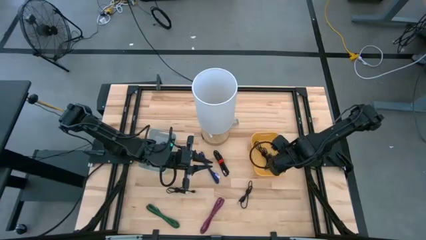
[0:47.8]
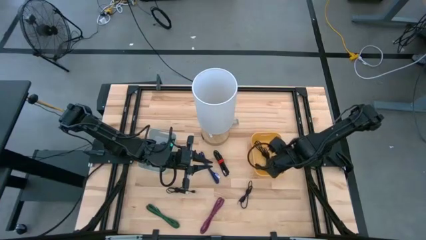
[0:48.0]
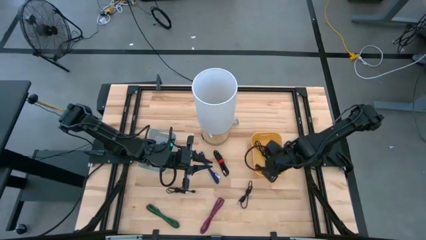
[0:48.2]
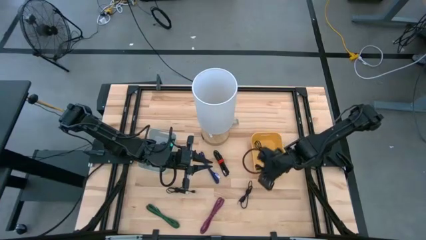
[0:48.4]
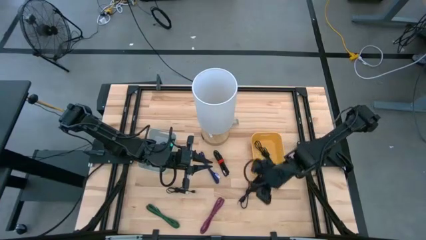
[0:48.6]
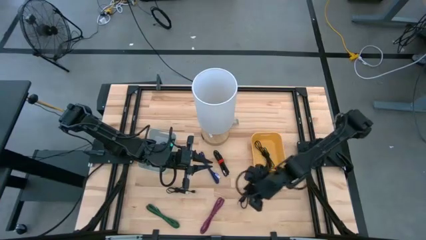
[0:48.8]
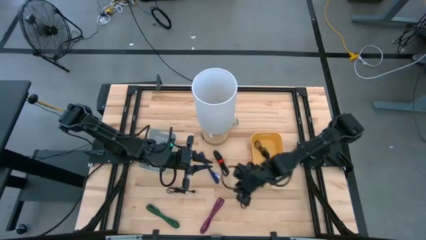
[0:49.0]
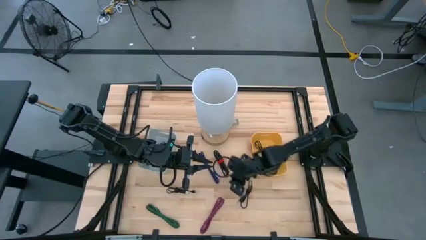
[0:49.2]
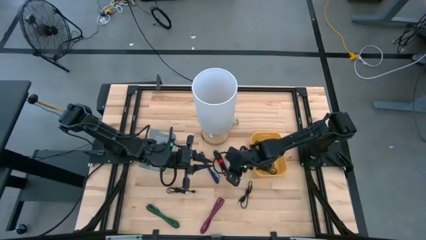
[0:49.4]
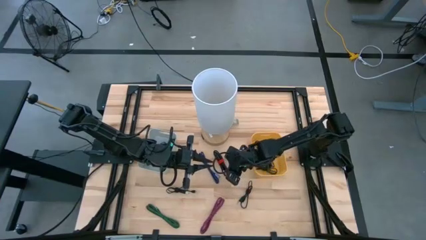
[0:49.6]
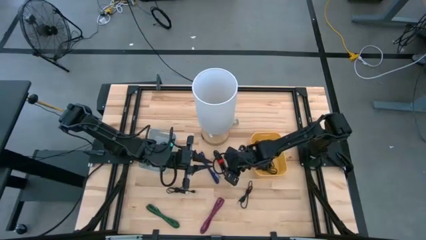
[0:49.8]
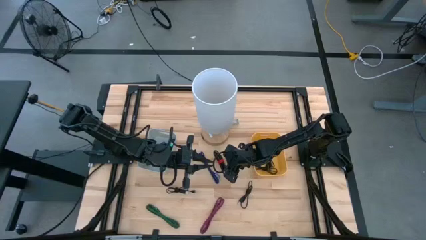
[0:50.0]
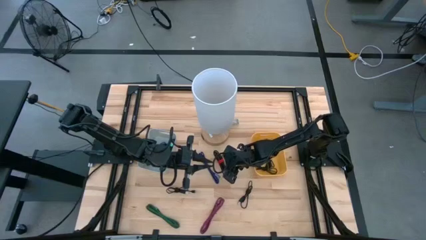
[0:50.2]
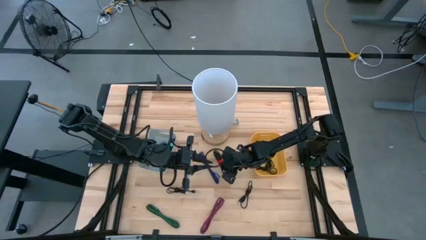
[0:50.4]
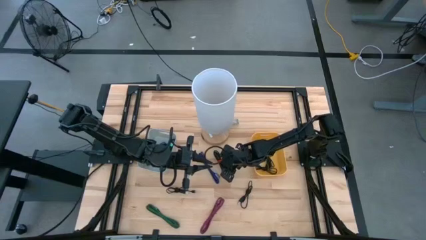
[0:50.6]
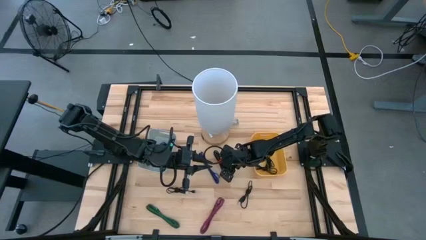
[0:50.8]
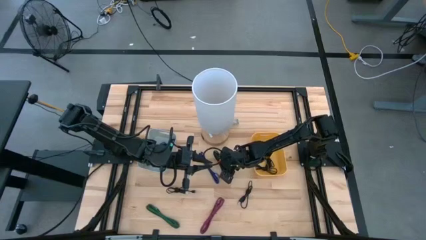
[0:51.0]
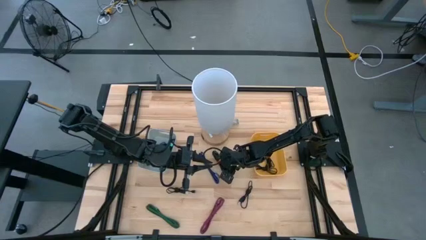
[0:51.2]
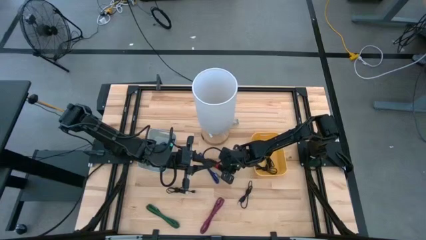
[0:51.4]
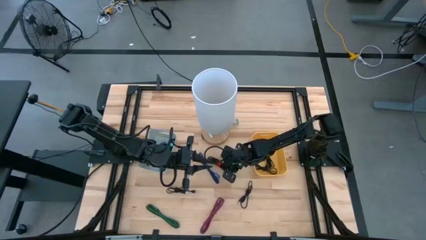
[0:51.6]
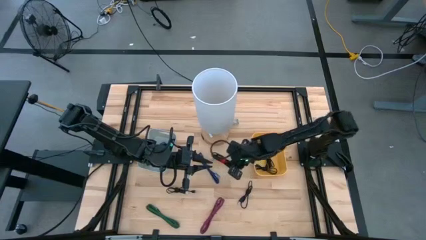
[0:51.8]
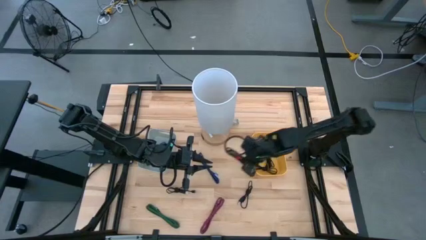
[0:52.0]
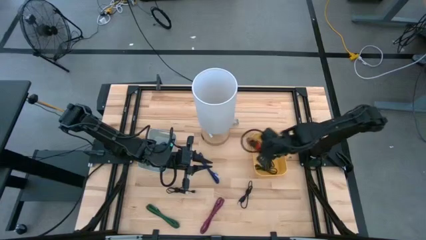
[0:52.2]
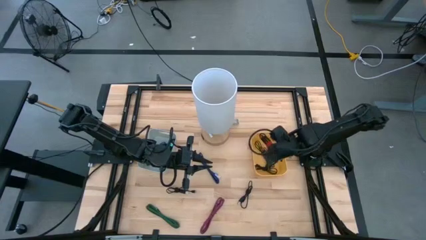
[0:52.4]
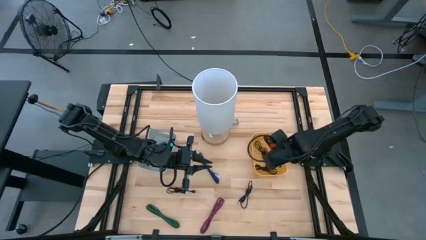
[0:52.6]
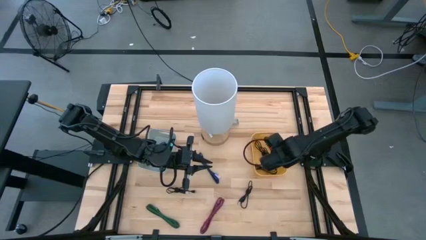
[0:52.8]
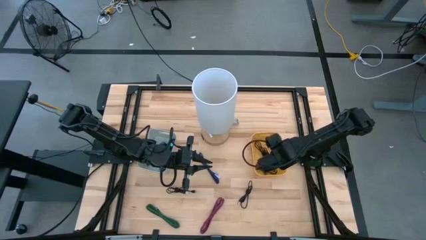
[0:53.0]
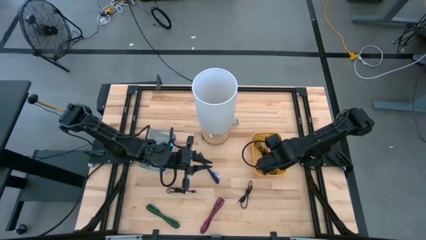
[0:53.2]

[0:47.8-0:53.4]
Task: Pick & Place USB Port
Put the black USB charger into the yellow bin

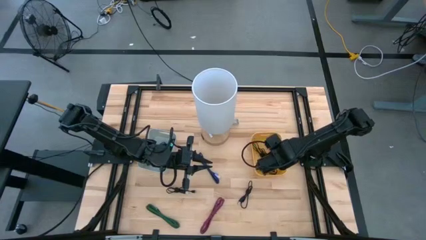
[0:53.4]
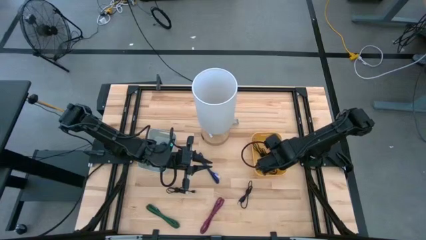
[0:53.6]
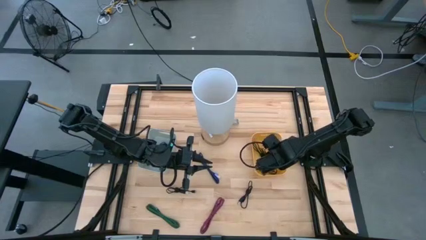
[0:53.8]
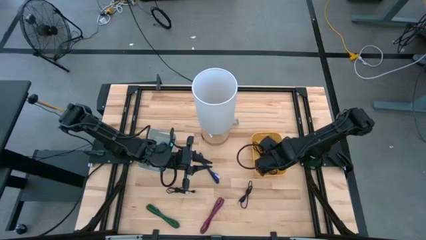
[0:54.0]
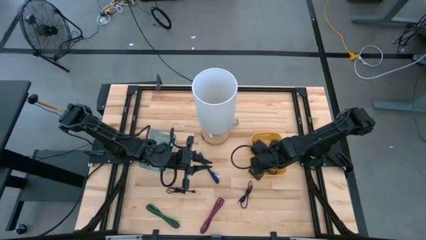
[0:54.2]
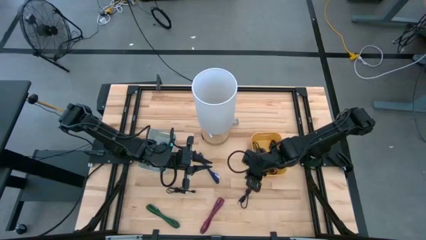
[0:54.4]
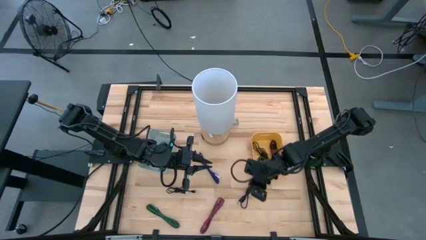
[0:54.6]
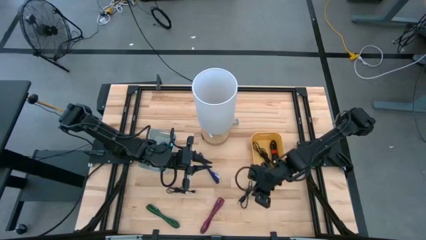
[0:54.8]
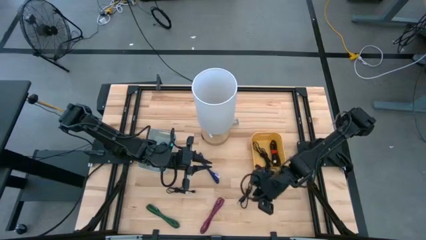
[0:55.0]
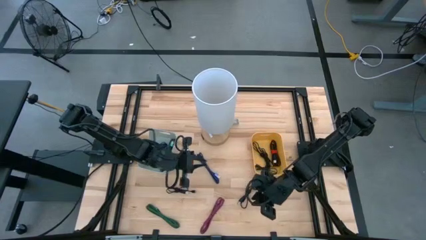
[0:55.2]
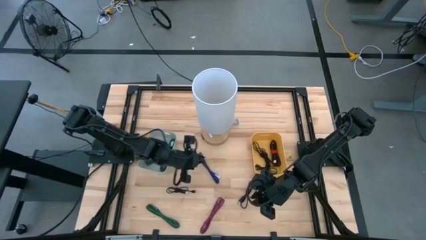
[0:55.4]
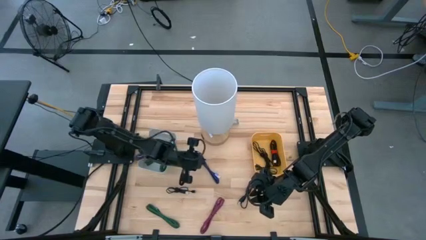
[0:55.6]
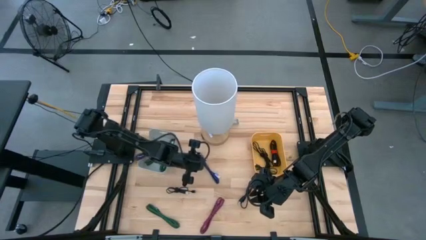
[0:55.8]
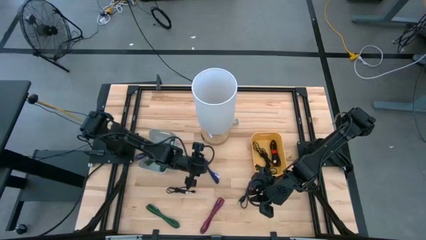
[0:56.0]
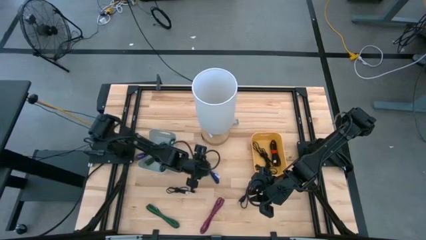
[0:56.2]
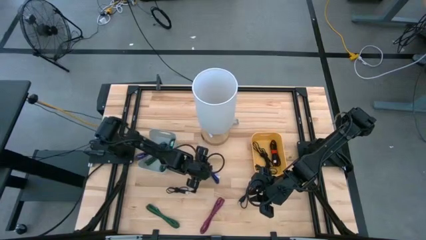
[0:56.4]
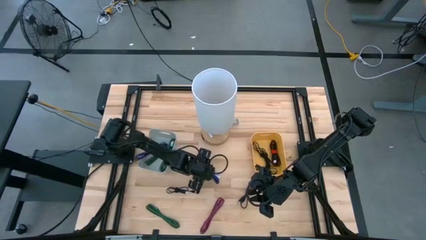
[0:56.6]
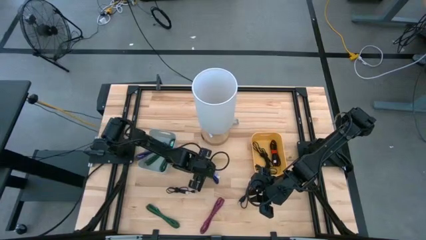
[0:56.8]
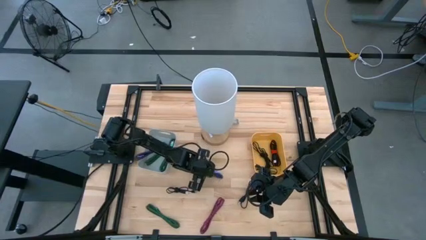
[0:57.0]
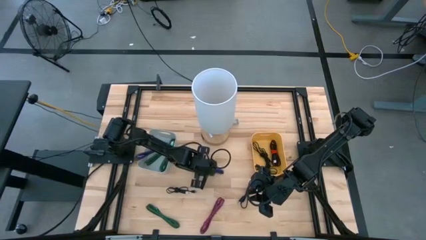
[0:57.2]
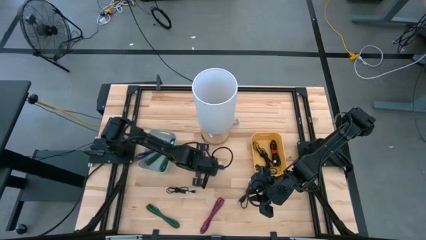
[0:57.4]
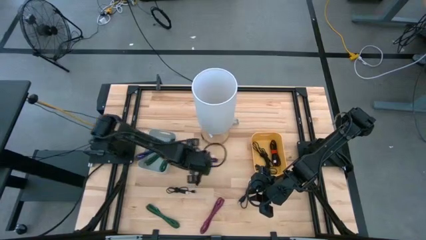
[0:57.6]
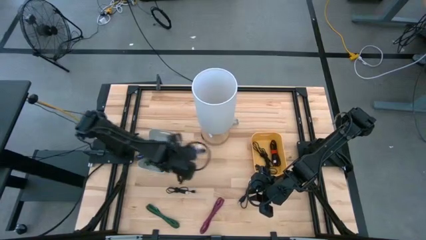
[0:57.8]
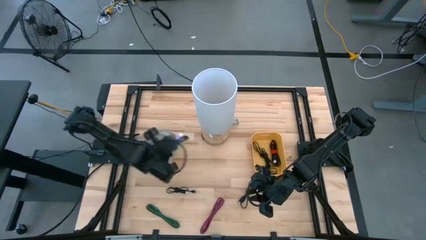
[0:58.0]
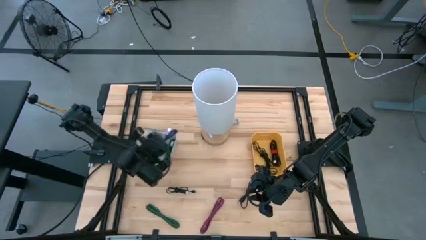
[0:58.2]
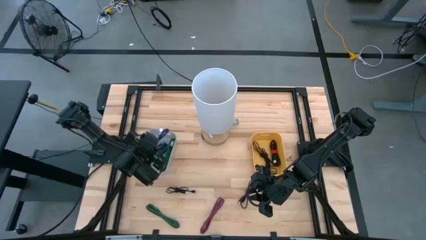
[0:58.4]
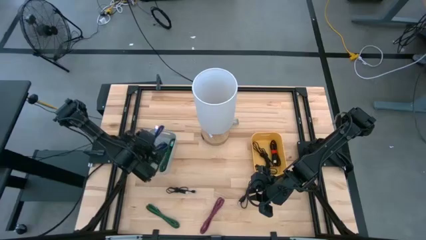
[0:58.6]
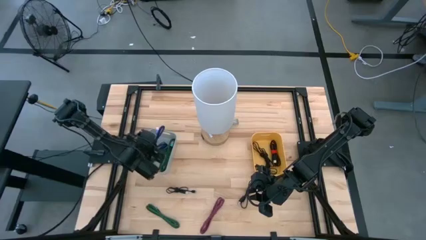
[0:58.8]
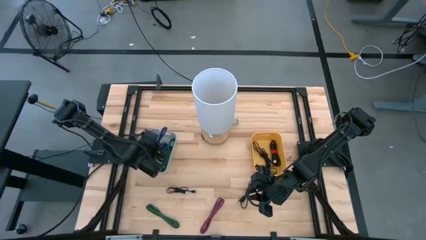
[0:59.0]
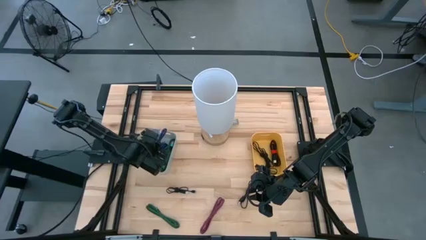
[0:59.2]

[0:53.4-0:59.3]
Put the blue patterned USB charger into the gray bin

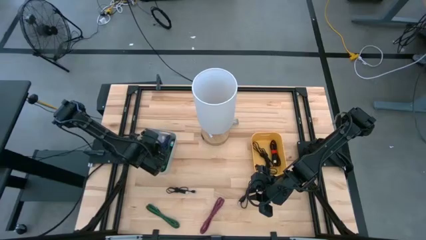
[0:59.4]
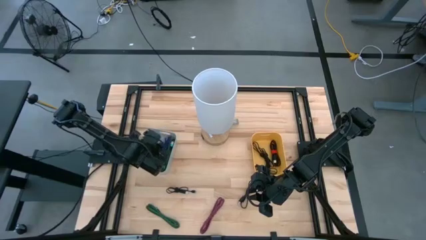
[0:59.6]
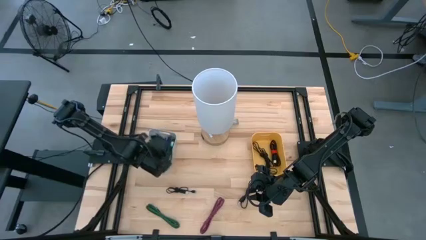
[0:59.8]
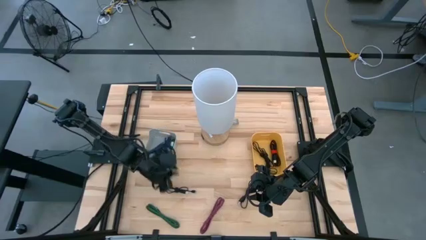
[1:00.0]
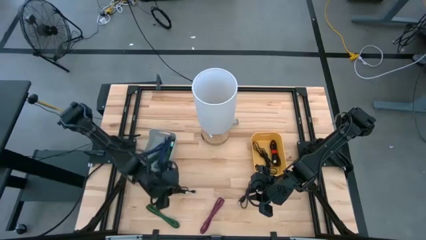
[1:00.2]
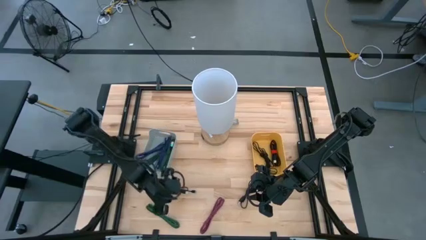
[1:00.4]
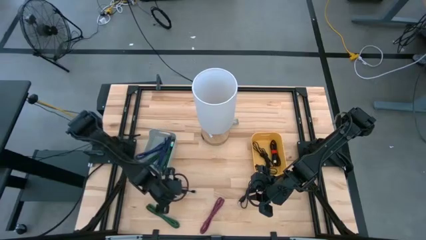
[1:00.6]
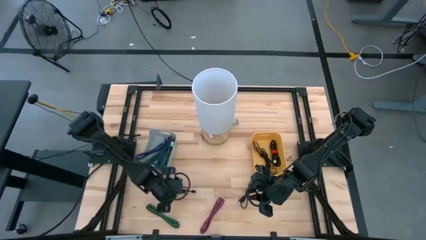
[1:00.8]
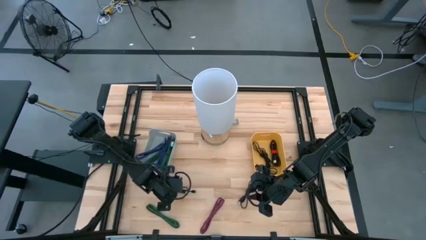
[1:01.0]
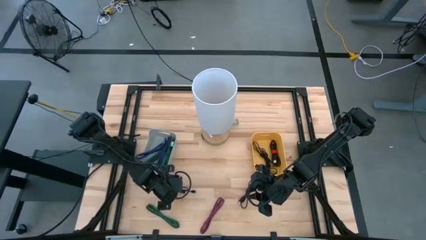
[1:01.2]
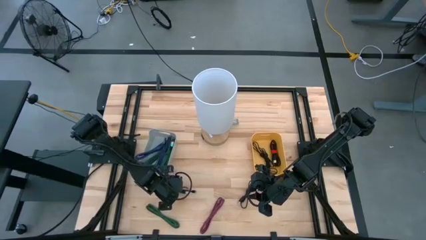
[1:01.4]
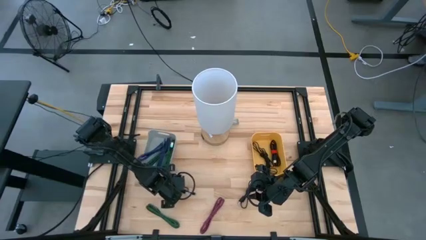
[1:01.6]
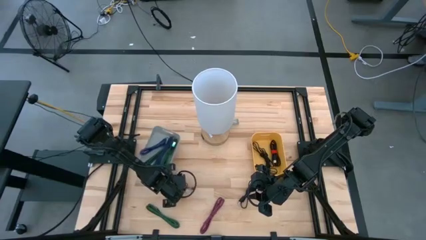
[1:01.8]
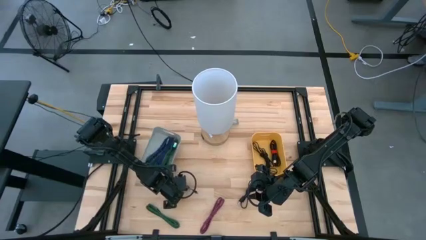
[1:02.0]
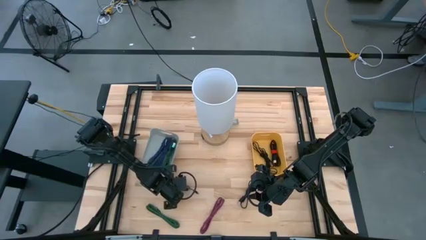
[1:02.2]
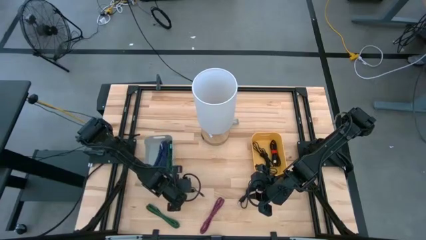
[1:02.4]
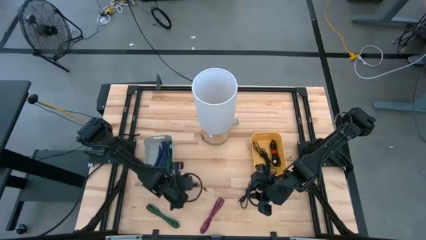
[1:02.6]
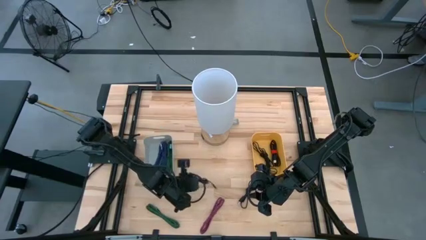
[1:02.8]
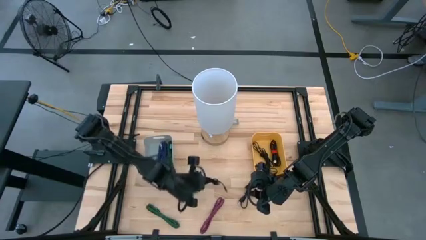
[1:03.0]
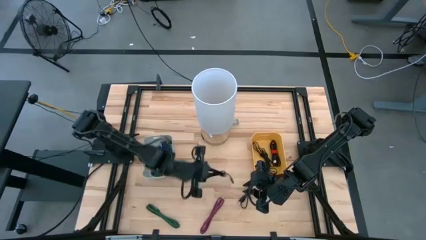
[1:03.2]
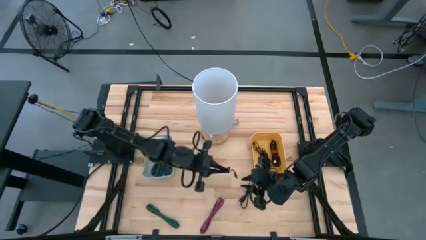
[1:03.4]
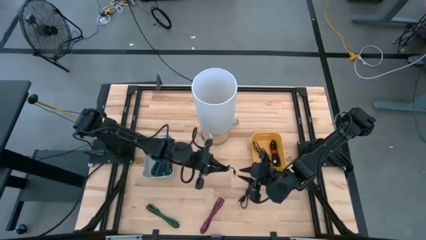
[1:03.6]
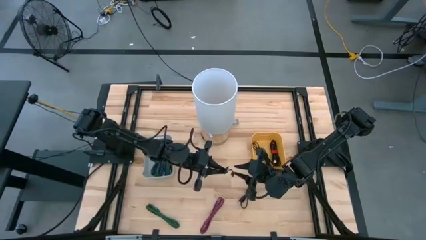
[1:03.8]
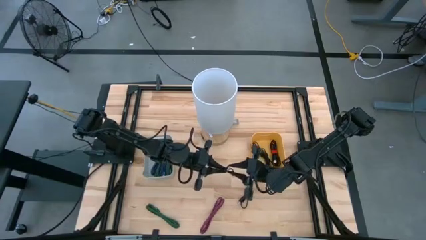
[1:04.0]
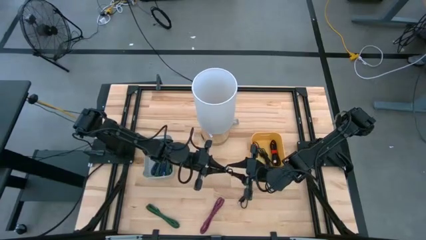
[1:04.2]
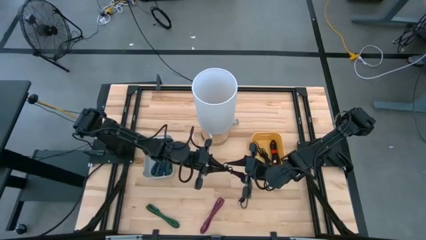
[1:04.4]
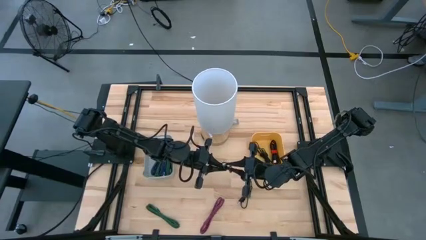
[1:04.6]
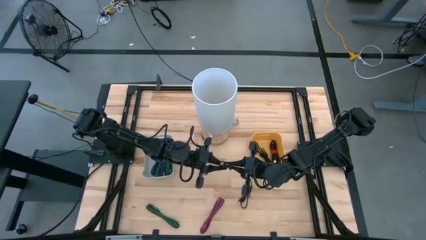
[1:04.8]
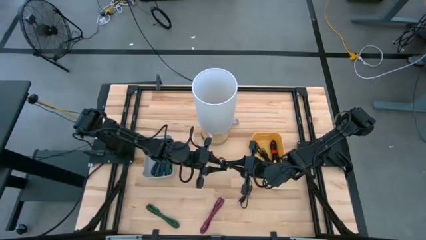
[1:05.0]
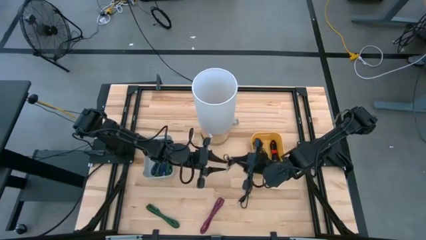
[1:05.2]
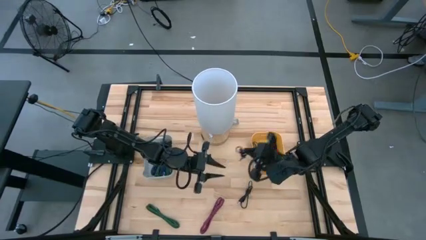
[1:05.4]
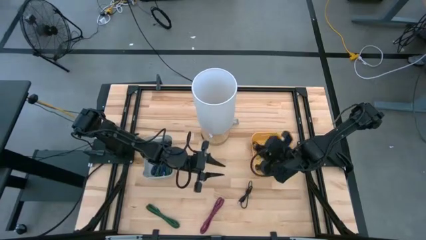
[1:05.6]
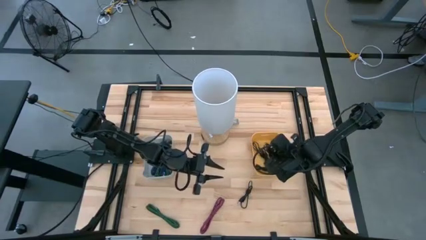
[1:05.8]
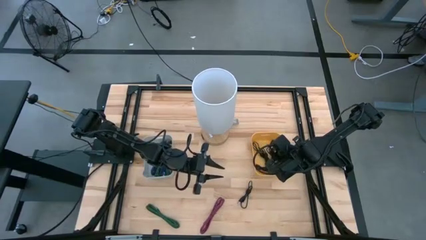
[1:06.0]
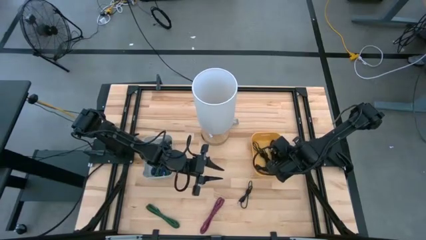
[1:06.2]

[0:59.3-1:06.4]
Put the black USB charger into the yellow bin
